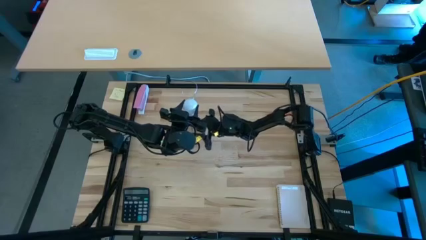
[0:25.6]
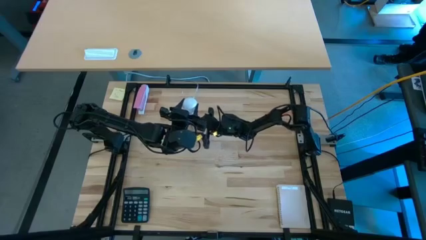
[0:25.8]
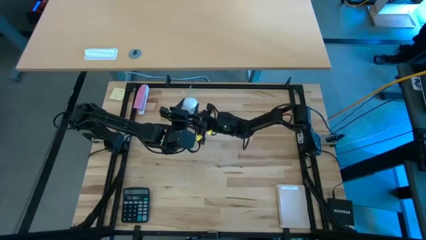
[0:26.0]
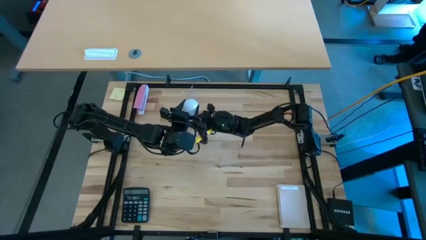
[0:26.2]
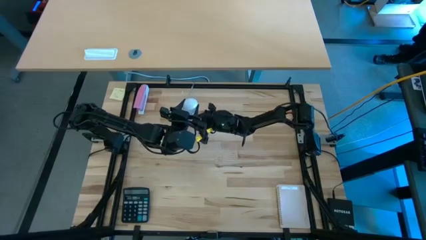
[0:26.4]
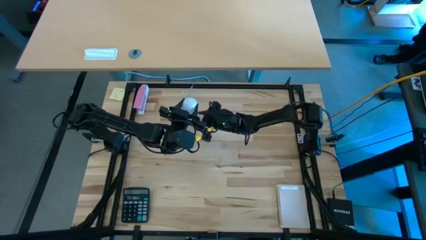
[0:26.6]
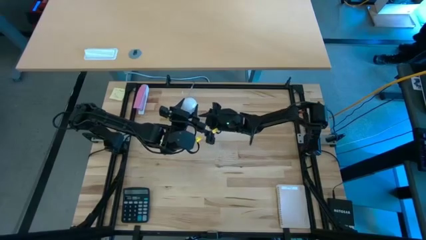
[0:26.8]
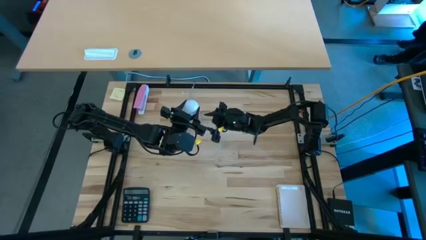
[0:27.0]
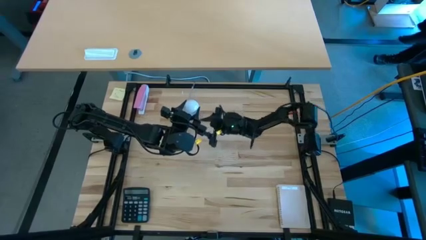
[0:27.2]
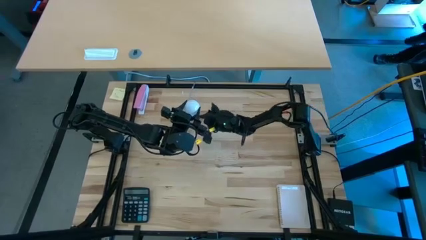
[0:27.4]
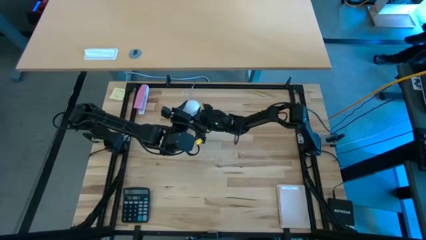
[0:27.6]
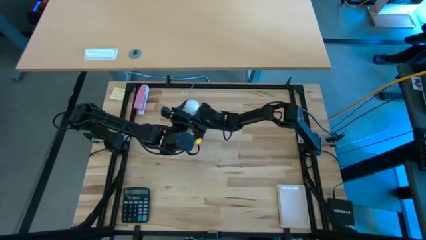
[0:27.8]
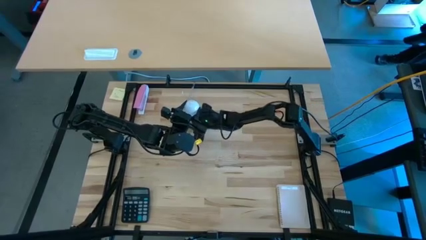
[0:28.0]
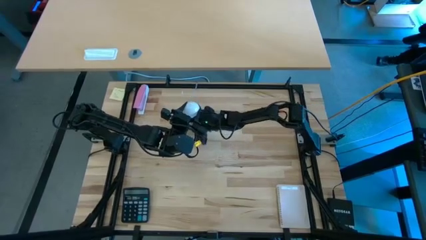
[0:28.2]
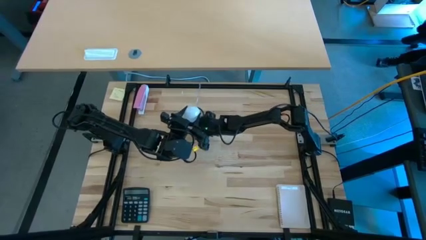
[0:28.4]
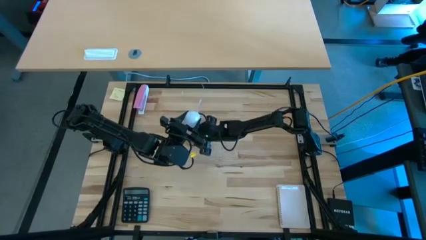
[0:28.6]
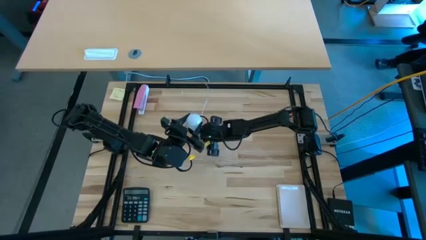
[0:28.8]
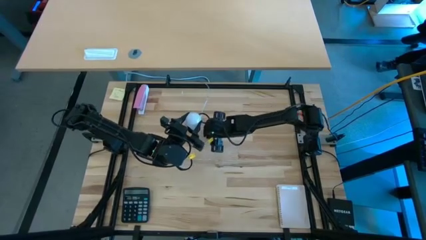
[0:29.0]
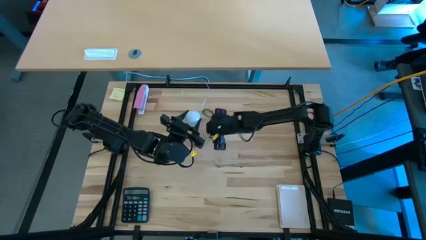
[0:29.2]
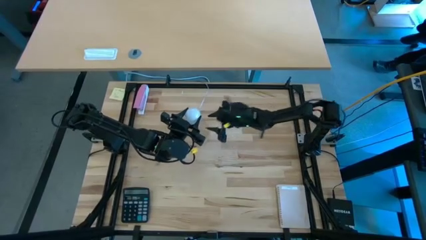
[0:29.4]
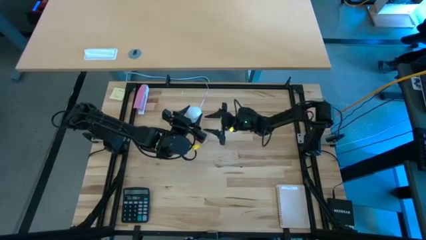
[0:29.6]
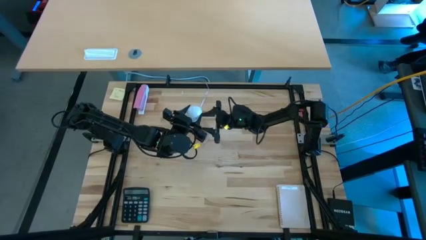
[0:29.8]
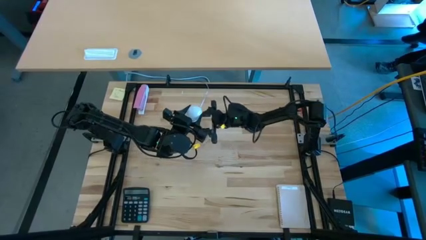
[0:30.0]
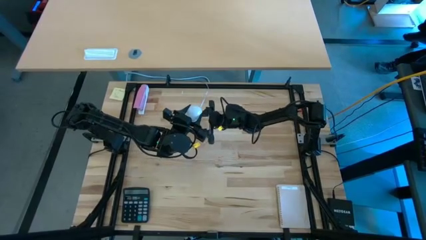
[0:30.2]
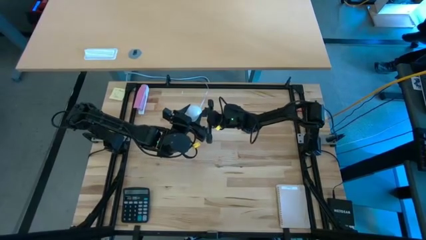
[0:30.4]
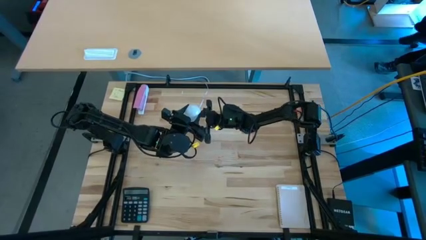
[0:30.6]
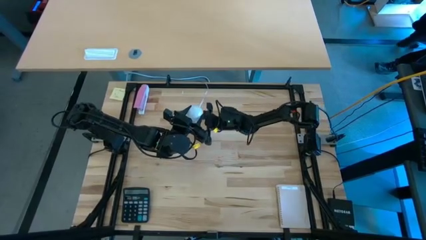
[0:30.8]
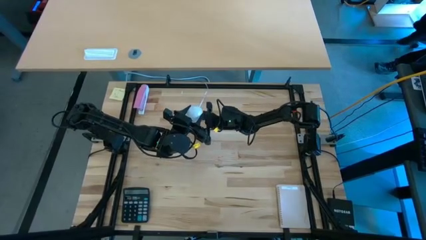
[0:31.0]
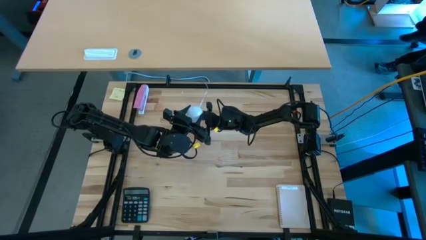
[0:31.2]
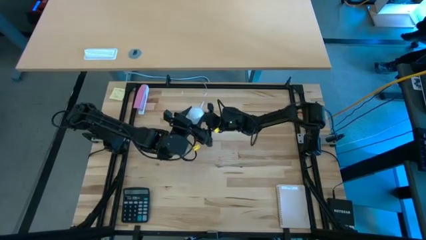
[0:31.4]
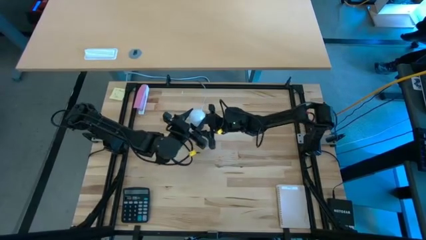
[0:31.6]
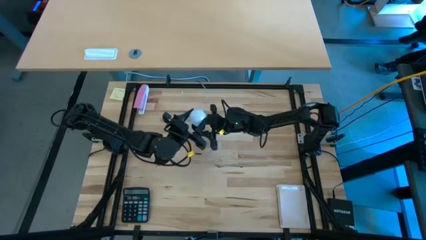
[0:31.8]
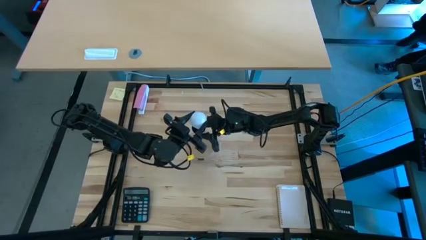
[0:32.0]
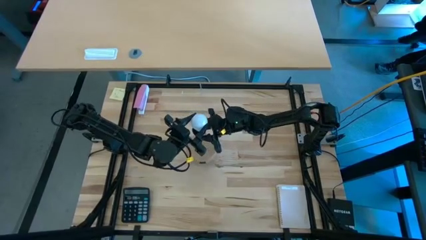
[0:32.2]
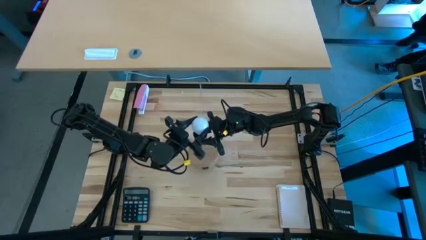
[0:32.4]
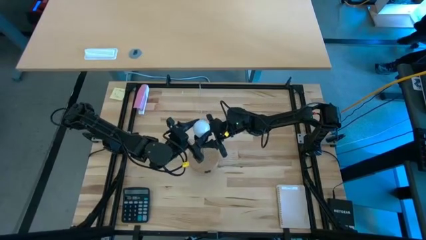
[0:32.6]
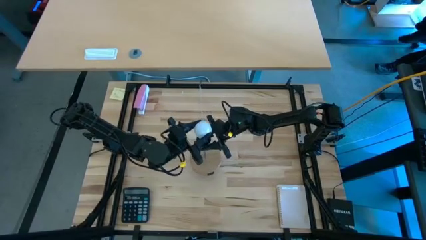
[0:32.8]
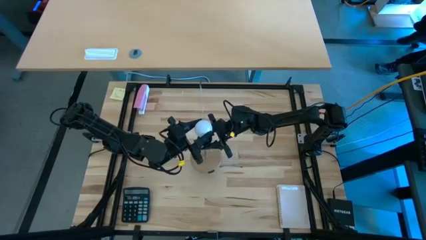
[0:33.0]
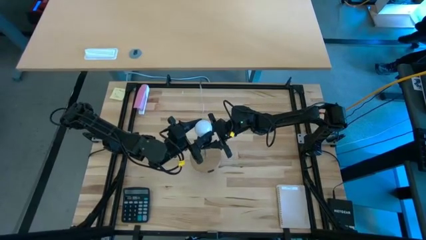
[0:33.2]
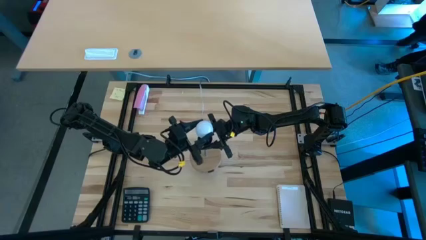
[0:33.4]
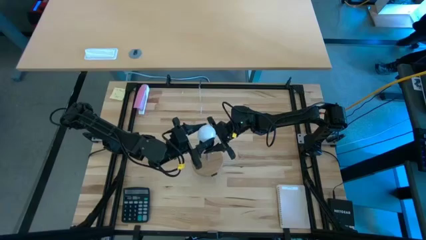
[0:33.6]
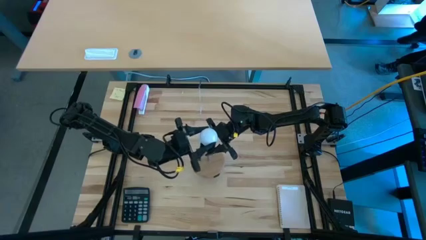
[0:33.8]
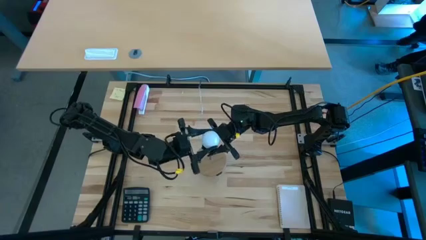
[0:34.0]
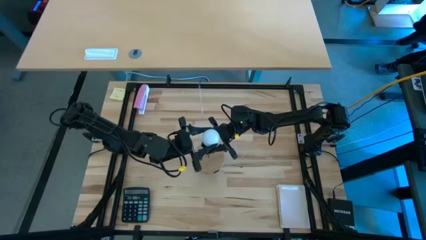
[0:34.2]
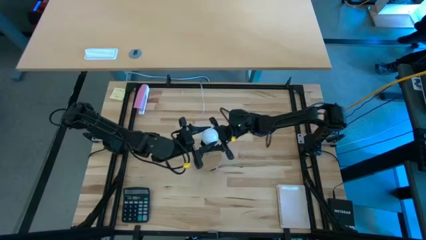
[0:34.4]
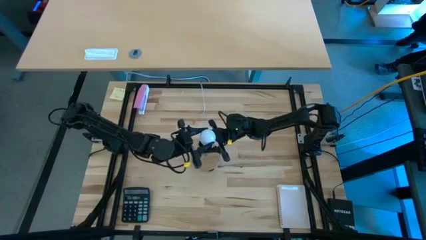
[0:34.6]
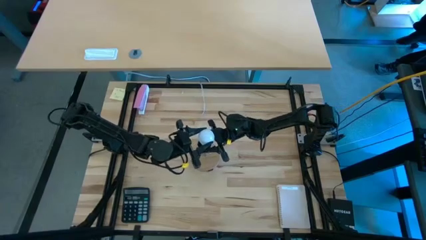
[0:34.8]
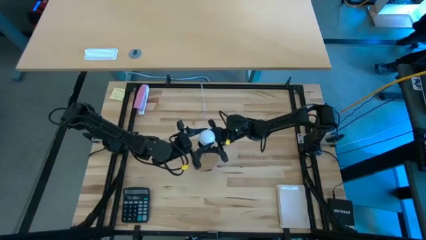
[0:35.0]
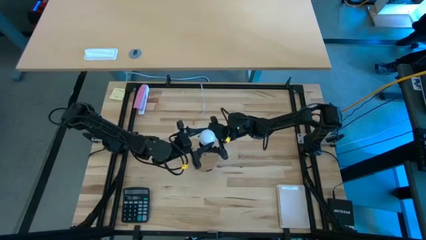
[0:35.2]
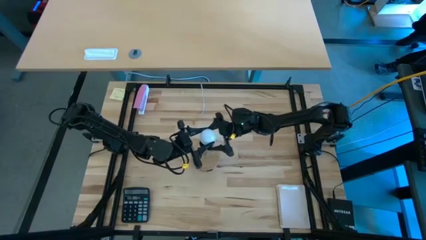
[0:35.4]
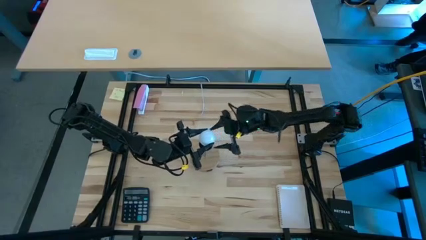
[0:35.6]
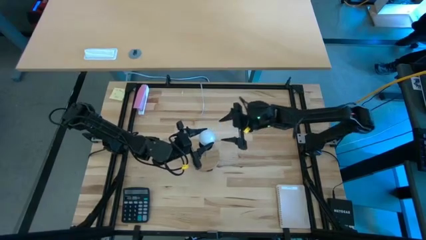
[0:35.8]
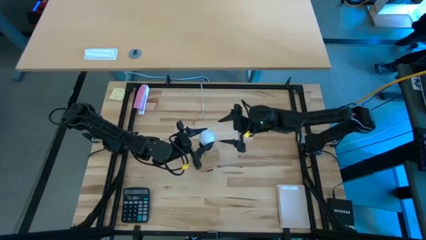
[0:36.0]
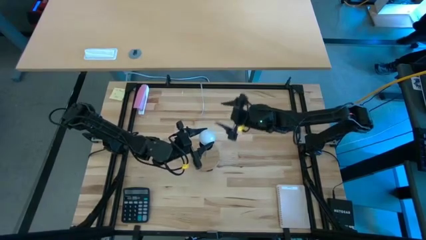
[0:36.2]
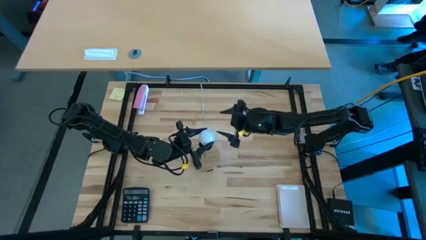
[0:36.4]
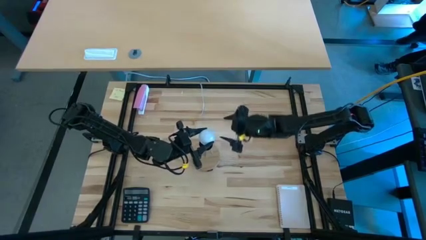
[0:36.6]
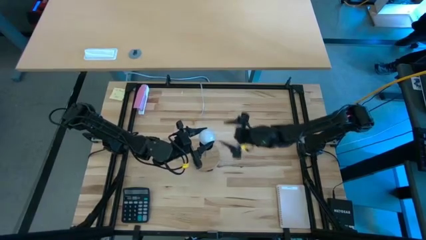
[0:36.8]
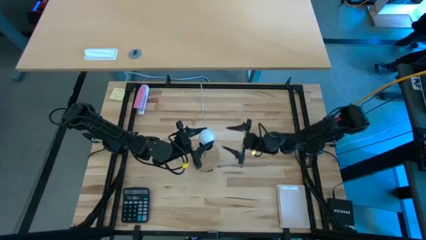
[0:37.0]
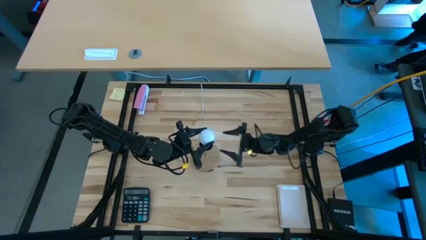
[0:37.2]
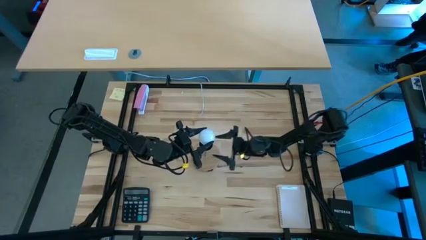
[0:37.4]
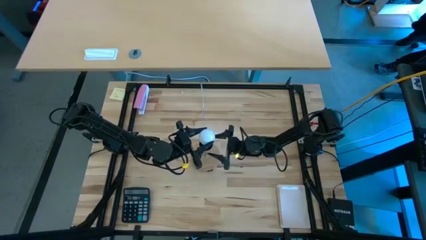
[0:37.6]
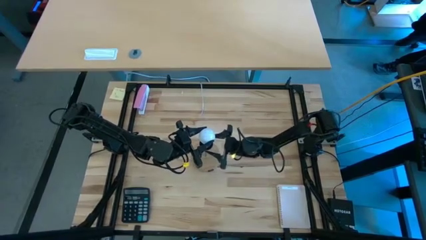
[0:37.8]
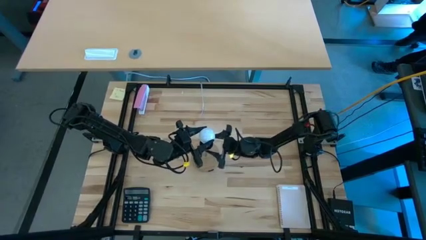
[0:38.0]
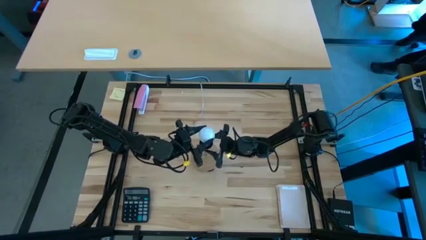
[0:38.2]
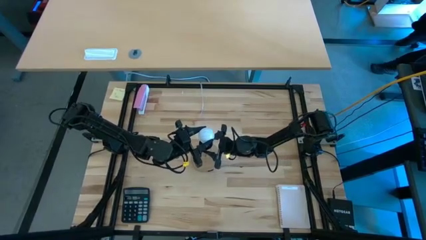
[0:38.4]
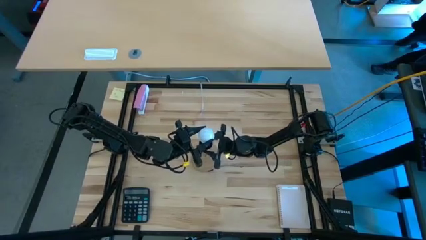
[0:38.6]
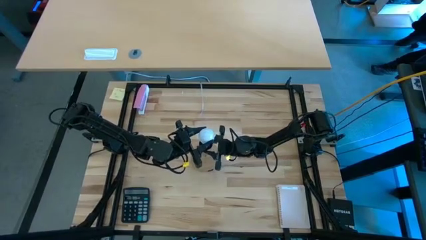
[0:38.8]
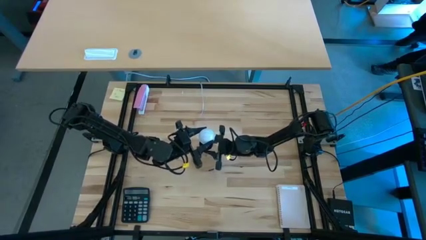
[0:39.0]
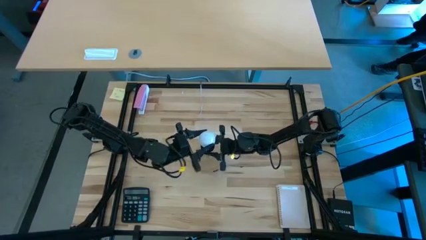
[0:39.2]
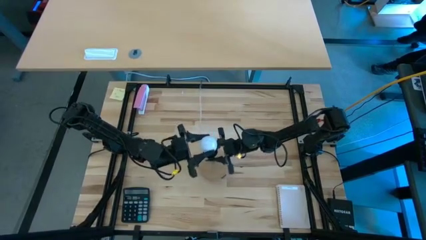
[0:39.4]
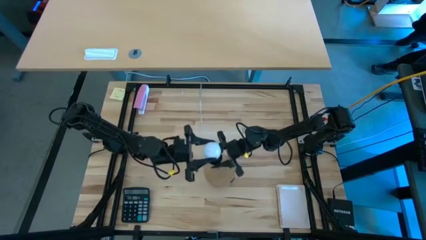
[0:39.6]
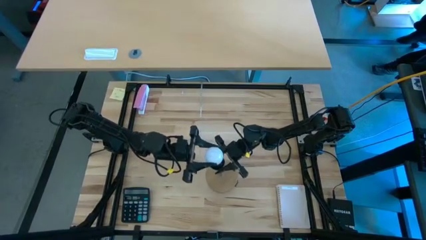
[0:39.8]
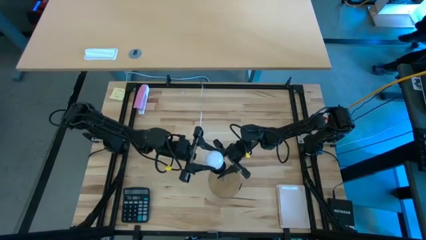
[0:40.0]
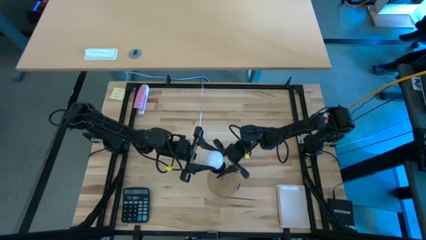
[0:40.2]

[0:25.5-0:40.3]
Task: Screw lightbulb
Insert the white lightbulb into the brown lamp
